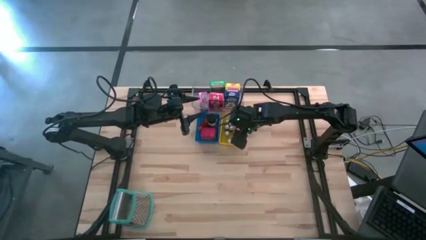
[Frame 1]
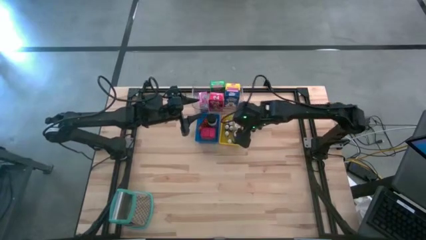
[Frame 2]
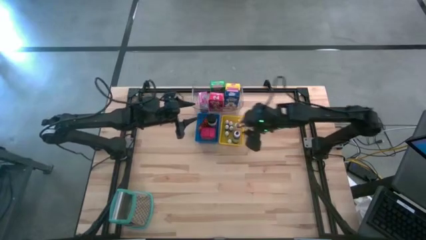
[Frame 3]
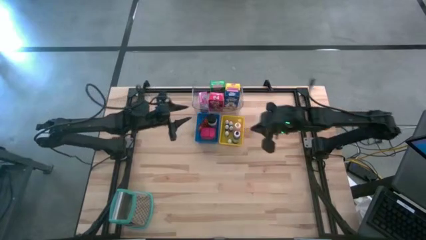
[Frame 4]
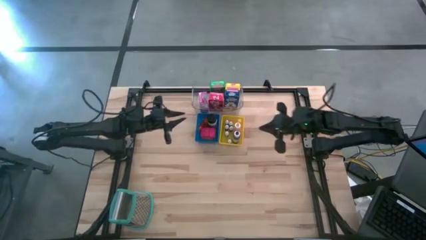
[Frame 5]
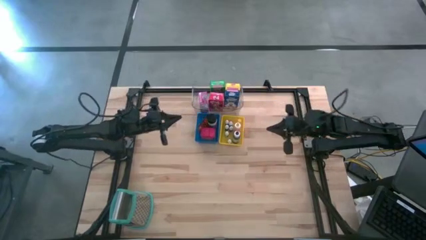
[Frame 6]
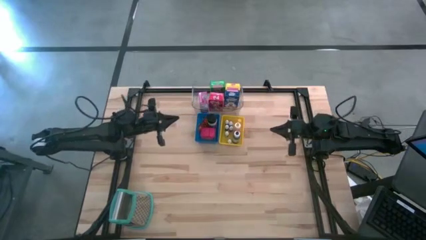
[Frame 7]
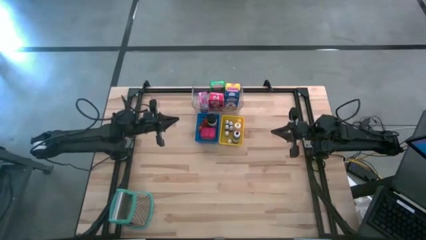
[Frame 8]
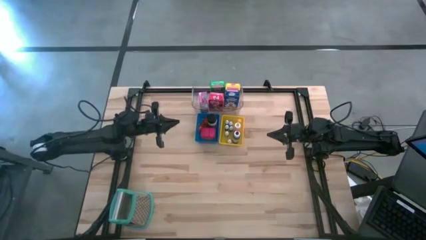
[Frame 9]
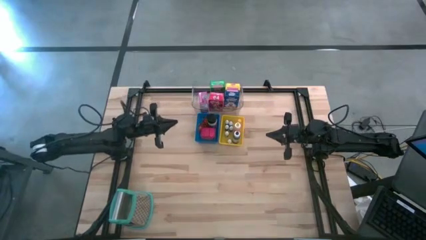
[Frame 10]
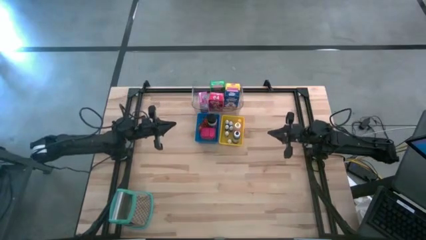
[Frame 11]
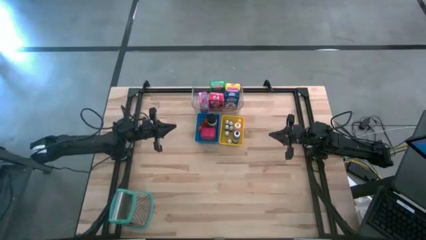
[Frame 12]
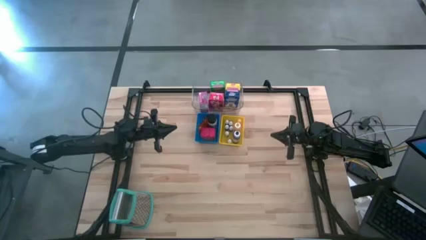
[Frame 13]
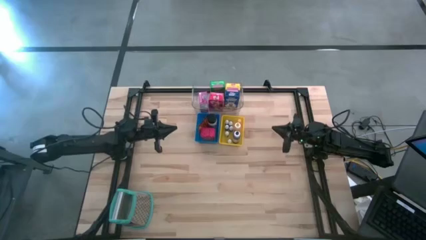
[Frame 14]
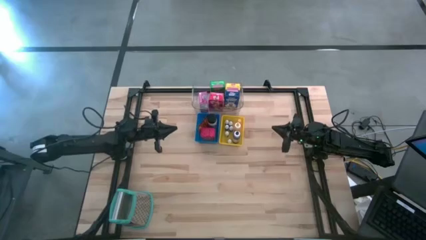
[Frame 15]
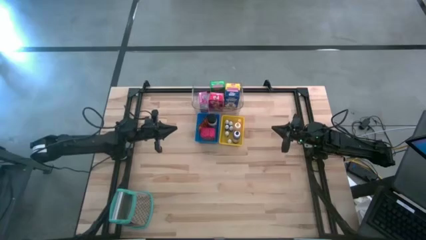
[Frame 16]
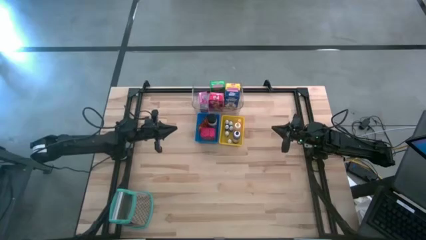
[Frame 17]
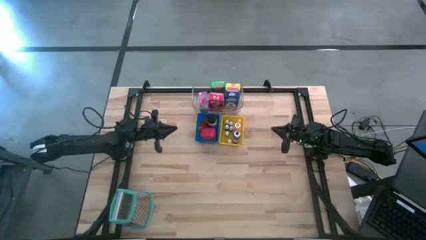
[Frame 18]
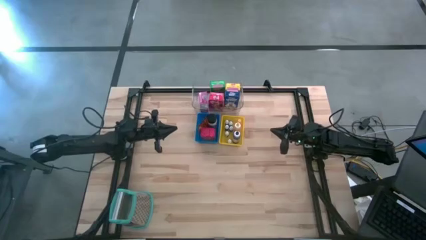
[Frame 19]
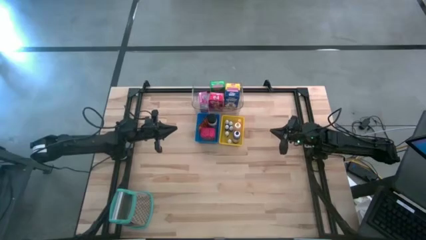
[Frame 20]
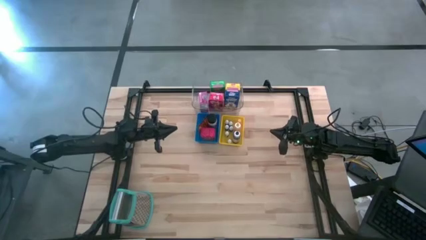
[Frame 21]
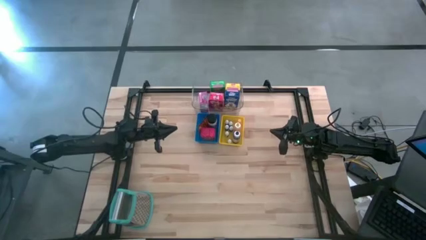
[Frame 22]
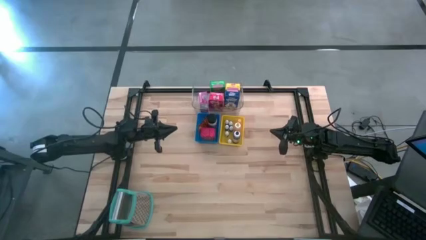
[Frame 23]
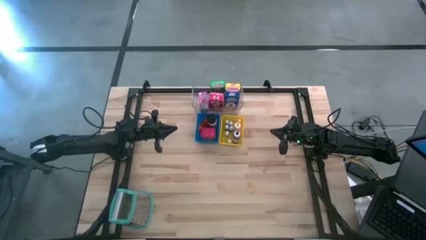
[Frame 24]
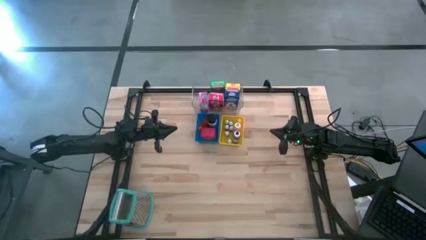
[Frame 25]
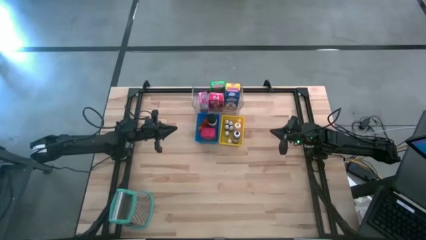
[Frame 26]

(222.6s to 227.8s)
Task: Pick & Place Kitchen Items
Return to Home Position

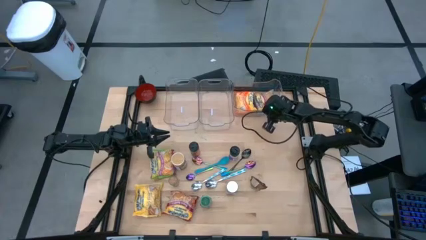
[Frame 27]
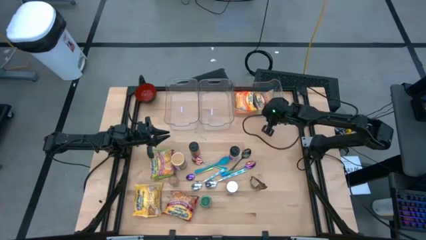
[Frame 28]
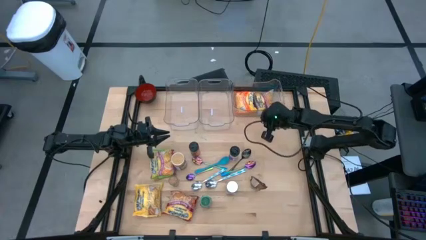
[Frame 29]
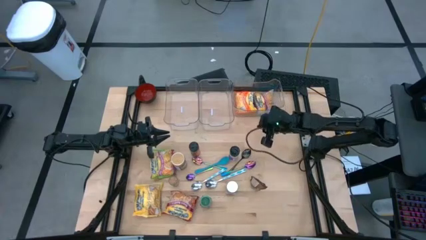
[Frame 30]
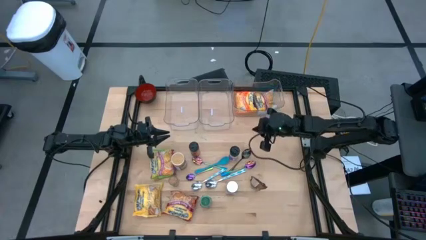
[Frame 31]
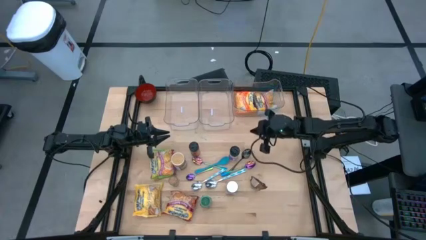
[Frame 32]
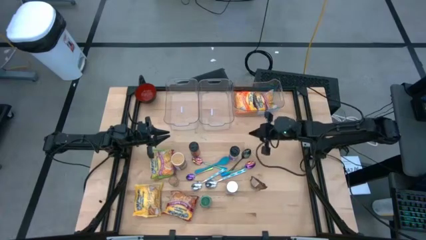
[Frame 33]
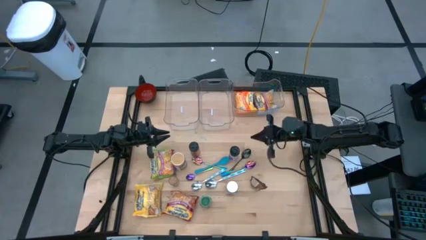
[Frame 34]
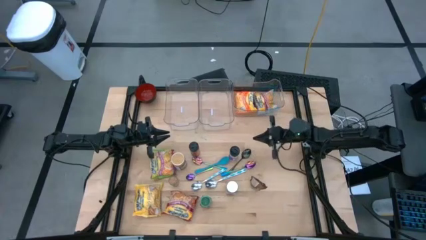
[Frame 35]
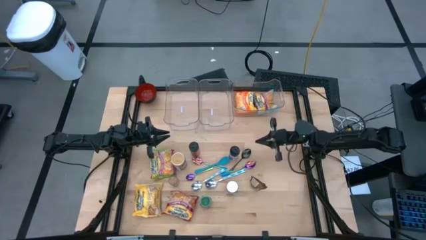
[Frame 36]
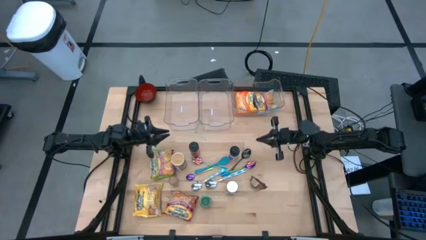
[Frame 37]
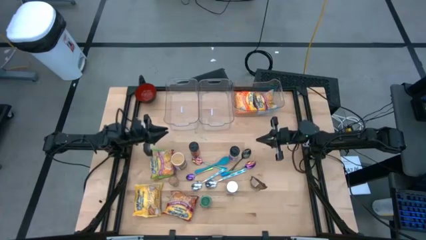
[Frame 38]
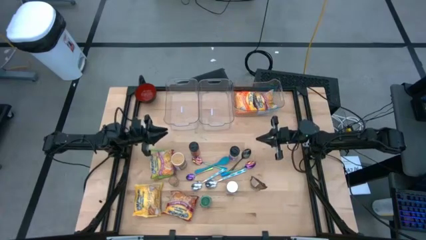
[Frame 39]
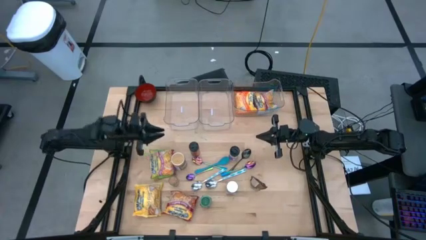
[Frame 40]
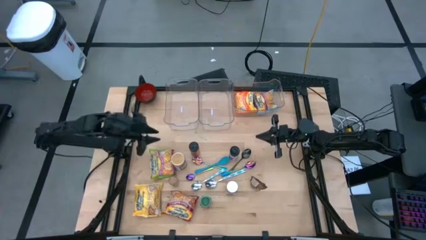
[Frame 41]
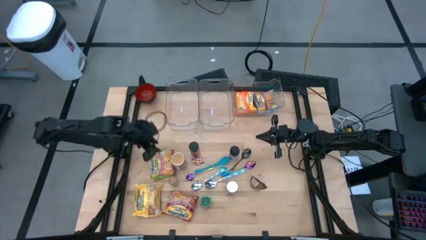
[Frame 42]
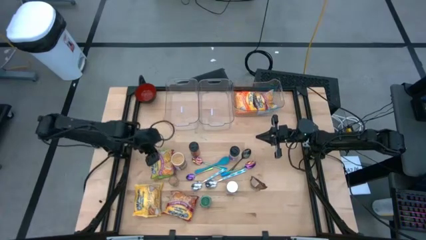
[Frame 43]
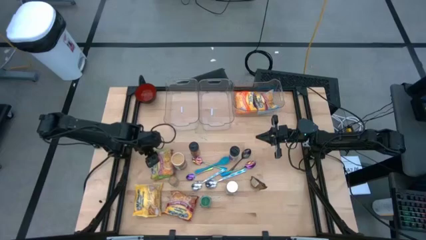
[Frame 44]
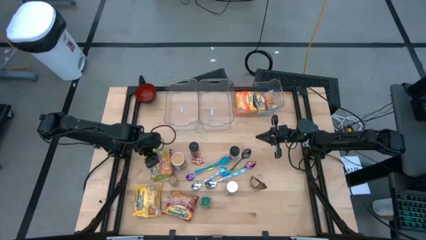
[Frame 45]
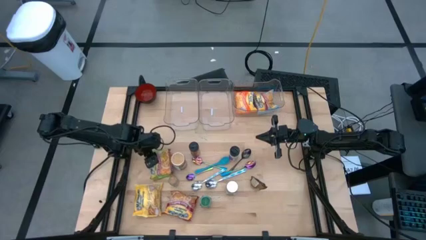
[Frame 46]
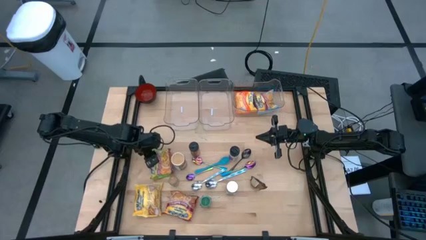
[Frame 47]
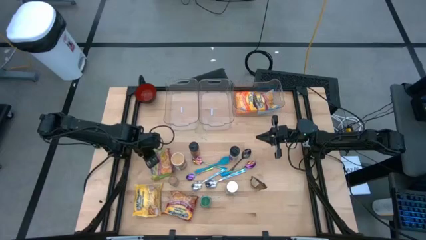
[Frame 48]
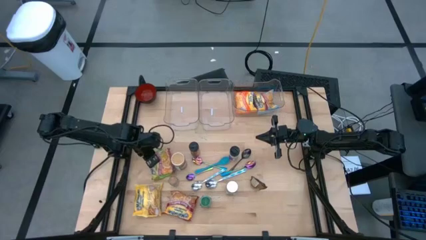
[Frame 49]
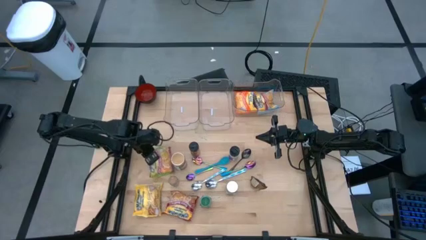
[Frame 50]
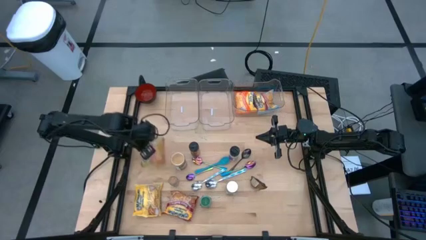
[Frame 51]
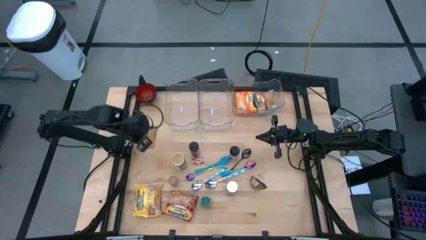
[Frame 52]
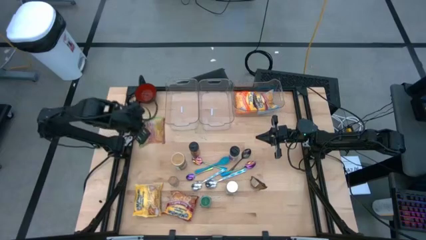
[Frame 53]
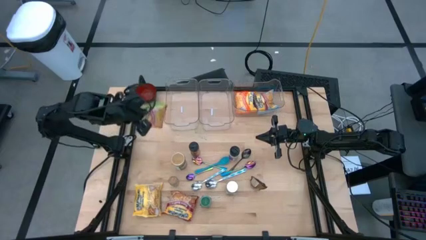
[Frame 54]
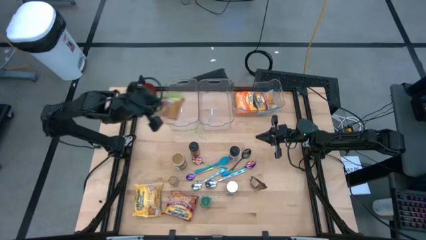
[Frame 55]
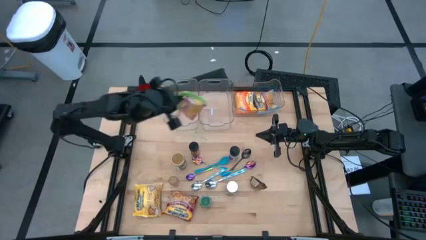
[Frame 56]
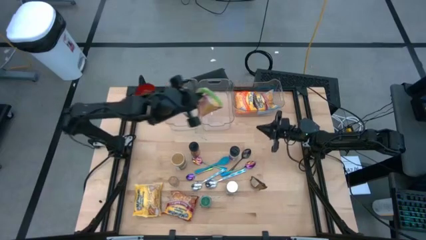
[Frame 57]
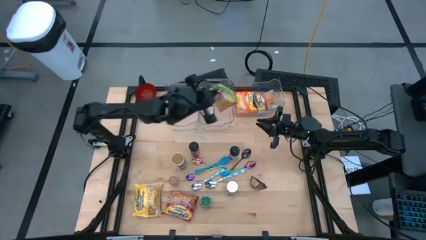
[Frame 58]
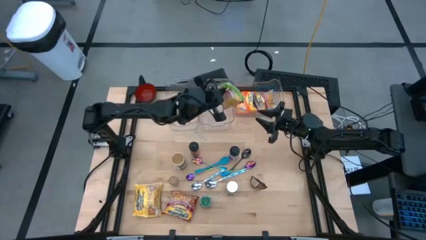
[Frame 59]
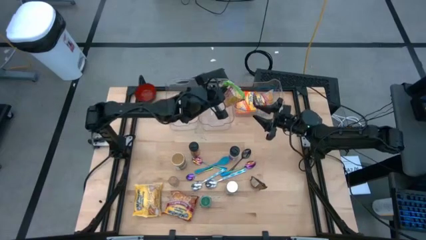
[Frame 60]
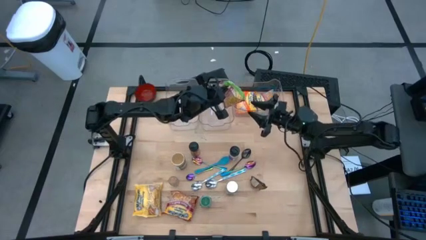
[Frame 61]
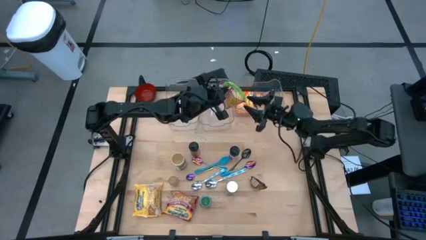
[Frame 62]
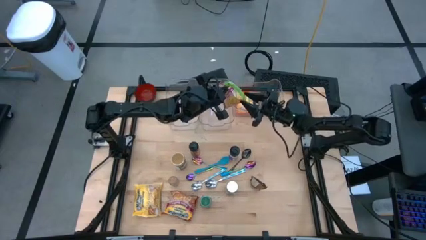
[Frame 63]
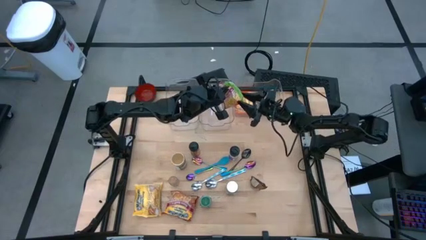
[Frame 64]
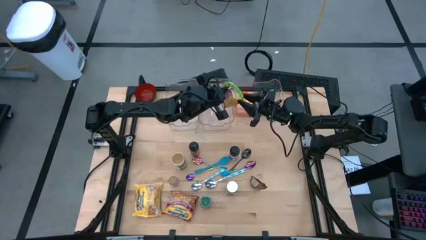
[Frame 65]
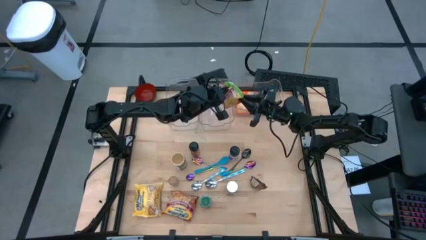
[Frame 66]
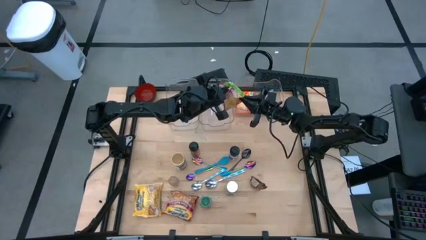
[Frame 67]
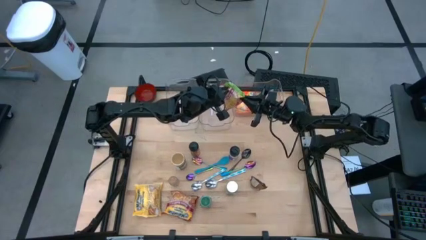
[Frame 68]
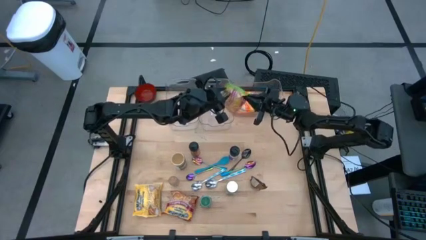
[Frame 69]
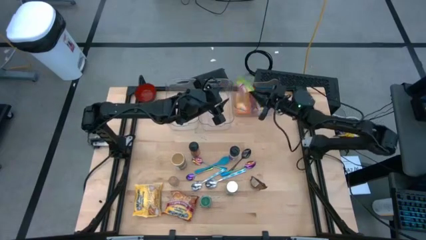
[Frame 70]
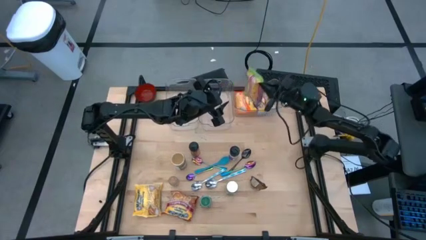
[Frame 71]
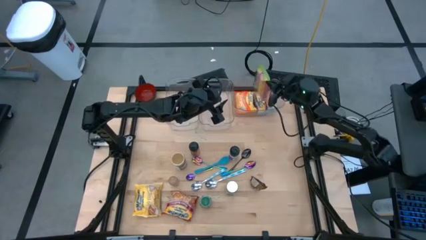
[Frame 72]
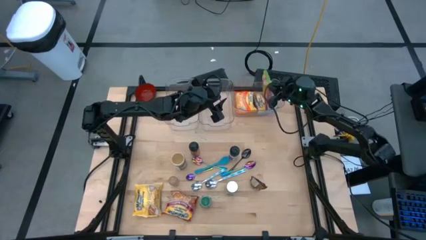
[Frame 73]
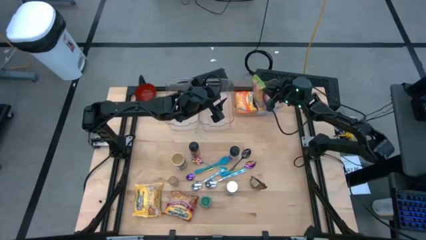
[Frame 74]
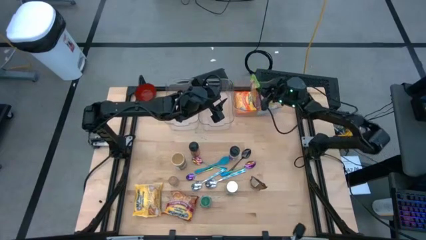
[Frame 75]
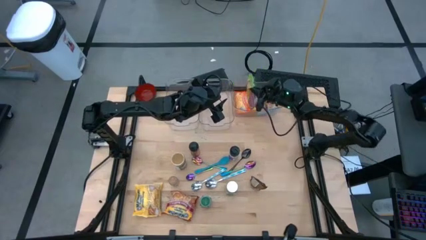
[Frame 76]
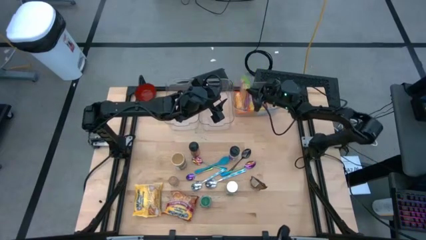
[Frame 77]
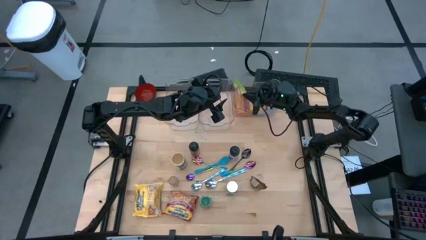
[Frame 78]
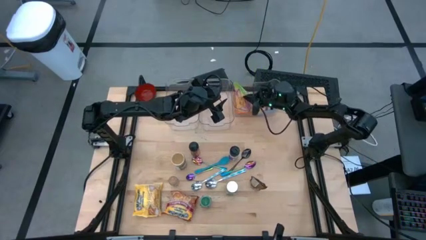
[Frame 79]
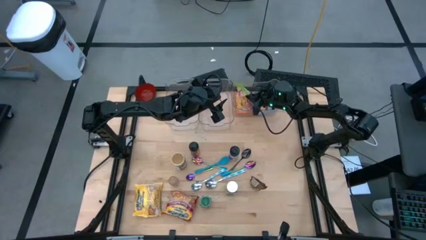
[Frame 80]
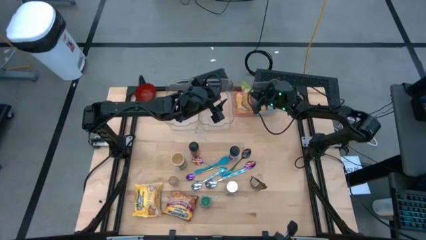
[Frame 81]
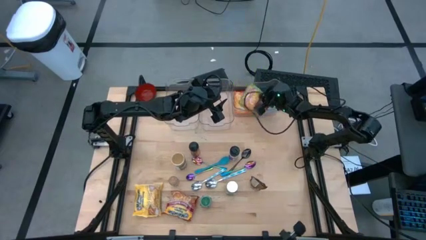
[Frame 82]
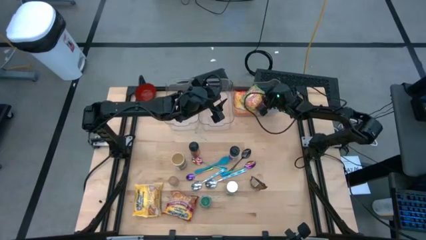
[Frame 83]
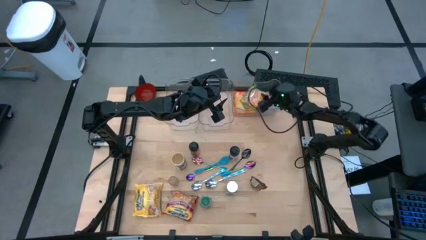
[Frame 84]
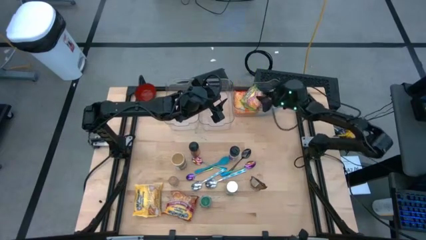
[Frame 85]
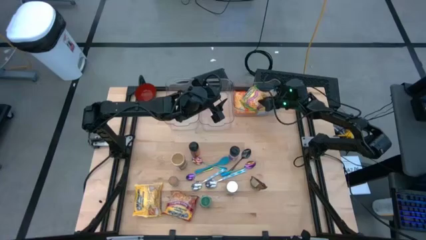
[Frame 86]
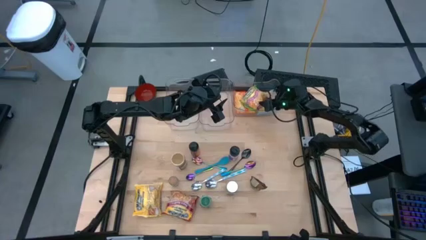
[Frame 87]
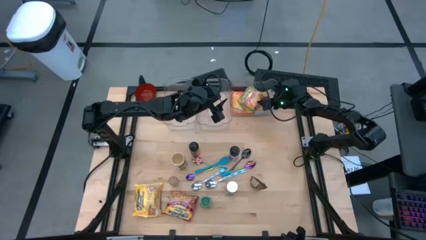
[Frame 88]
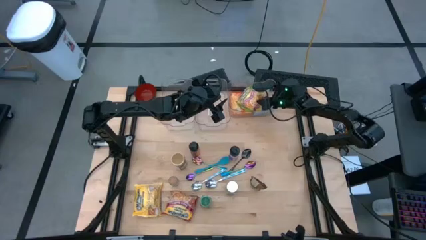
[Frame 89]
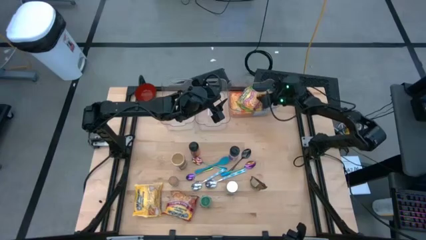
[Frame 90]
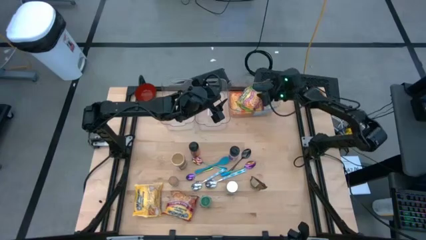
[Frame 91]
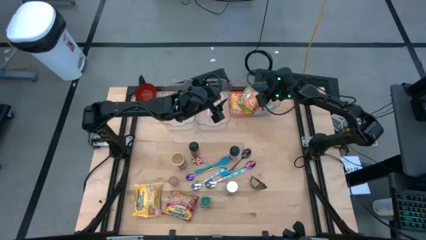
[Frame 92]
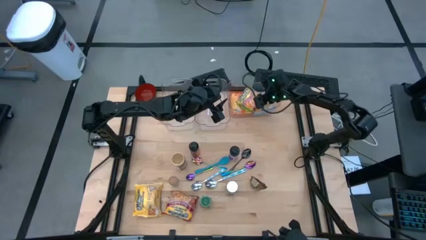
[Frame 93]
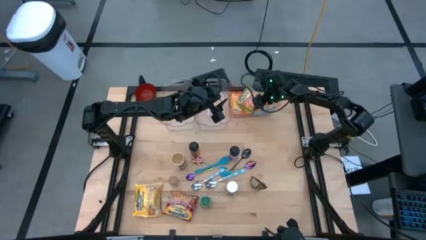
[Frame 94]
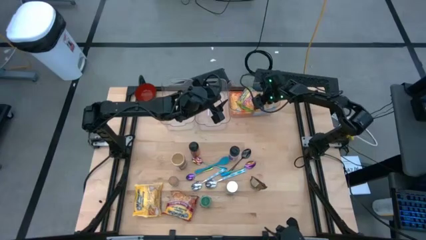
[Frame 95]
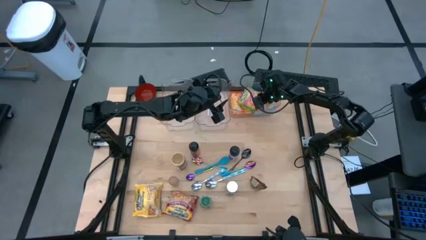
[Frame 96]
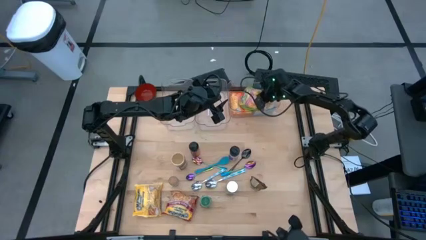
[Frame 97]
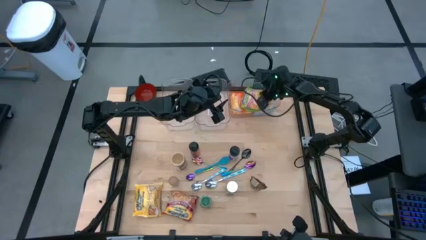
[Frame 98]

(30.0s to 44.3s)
Task: Pick & Place Food Item
Put the green noodle pack into the right transparent bin
